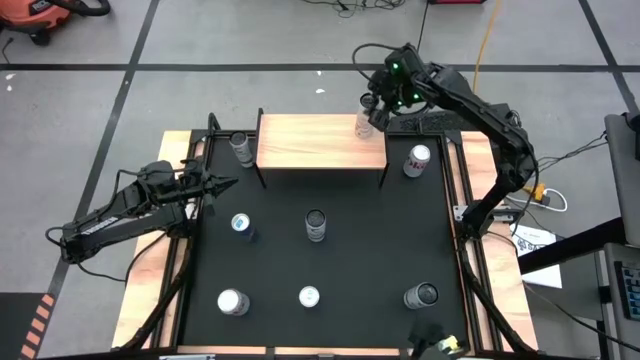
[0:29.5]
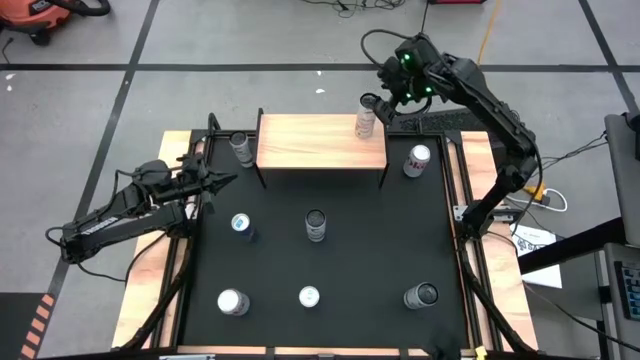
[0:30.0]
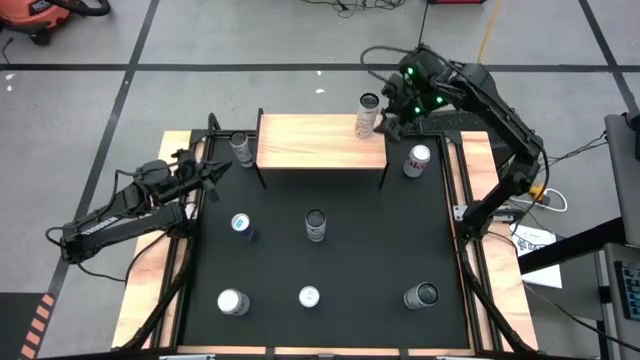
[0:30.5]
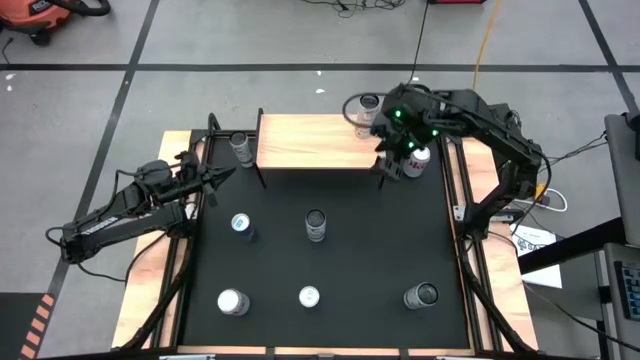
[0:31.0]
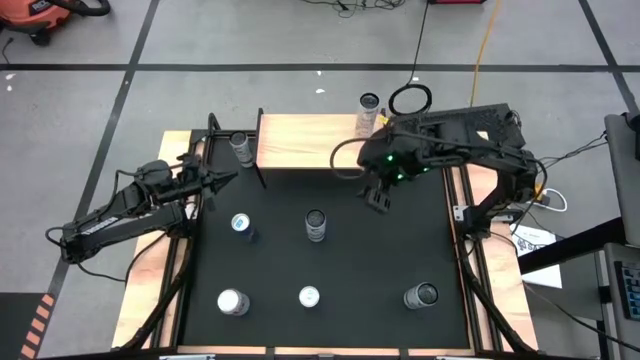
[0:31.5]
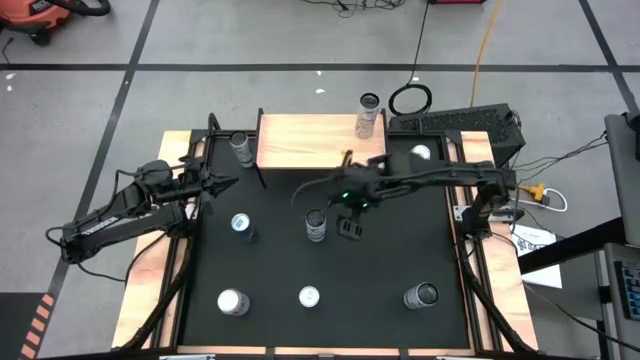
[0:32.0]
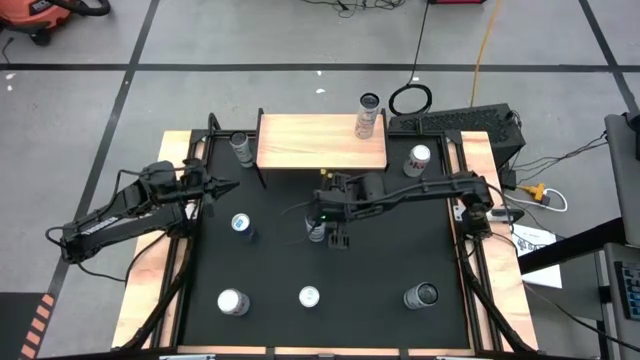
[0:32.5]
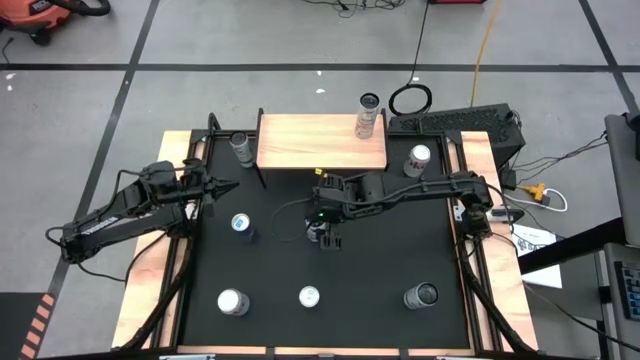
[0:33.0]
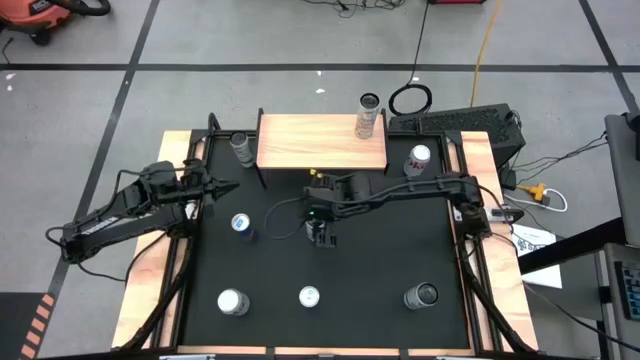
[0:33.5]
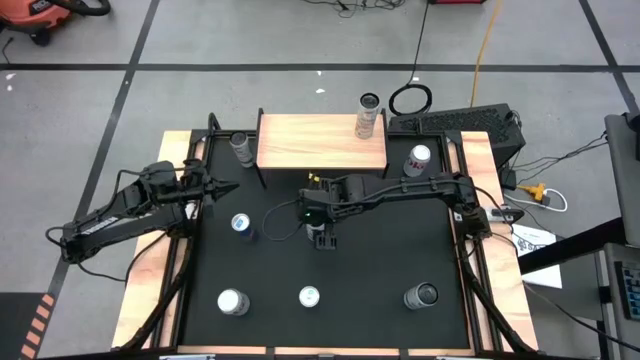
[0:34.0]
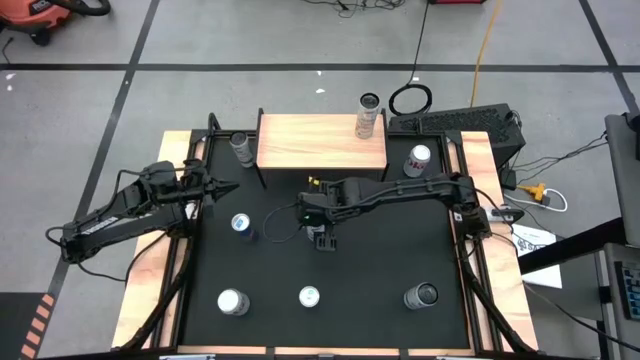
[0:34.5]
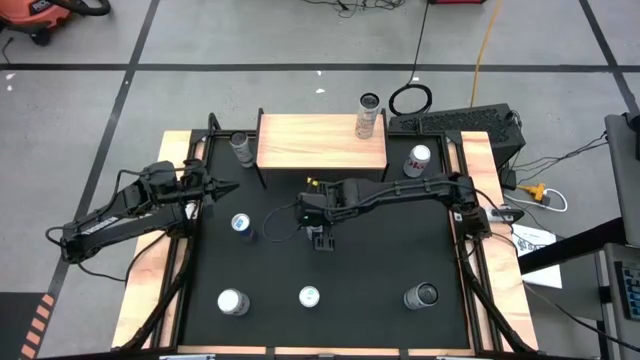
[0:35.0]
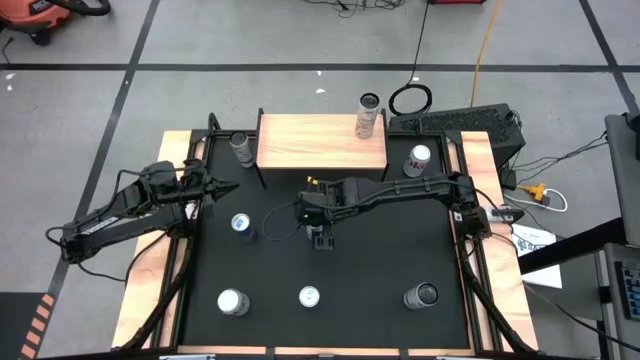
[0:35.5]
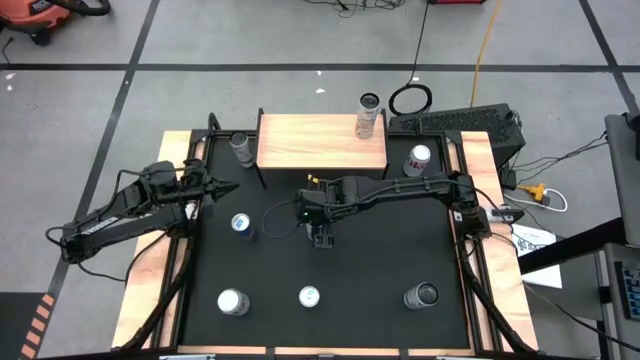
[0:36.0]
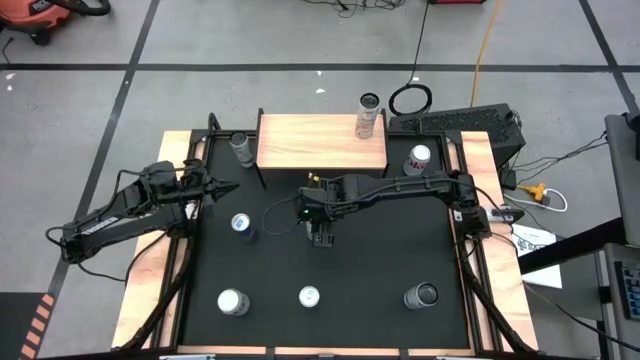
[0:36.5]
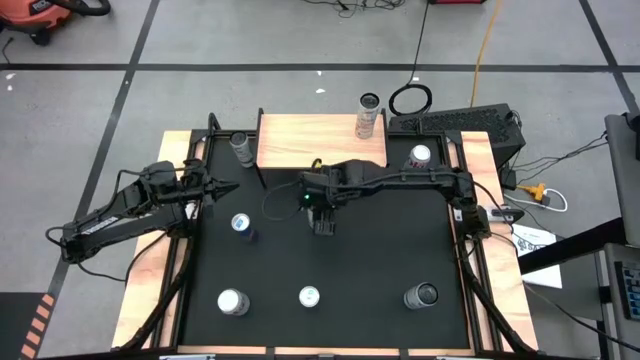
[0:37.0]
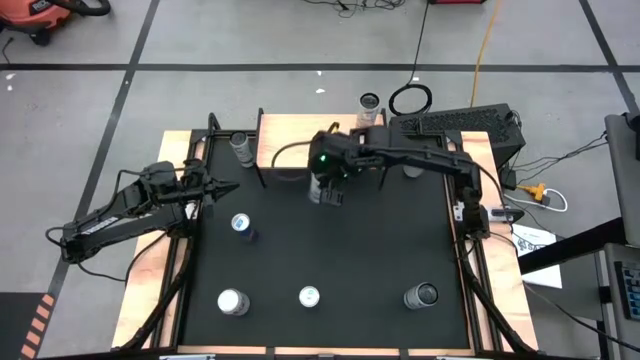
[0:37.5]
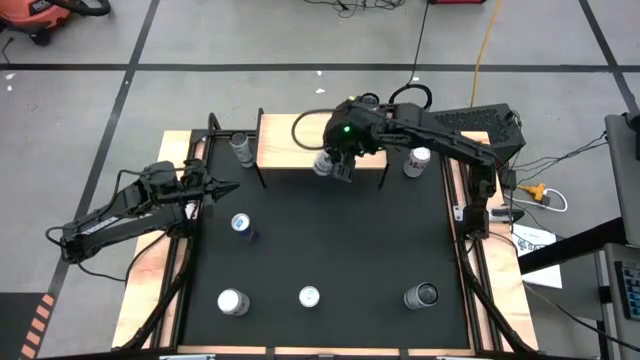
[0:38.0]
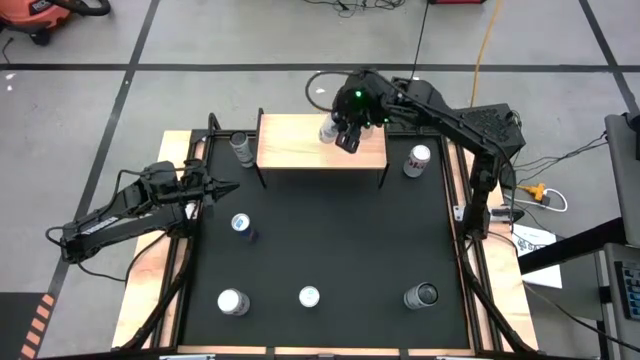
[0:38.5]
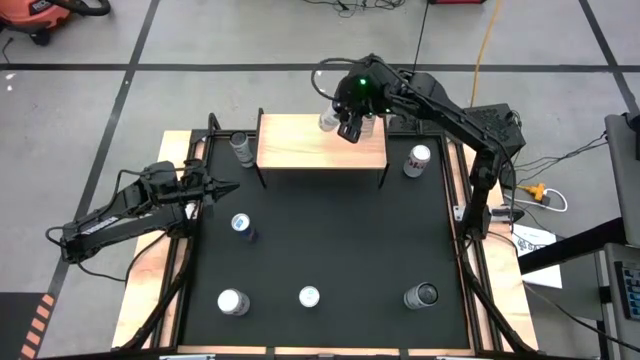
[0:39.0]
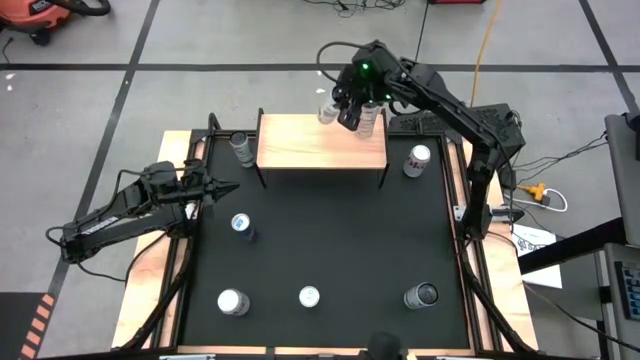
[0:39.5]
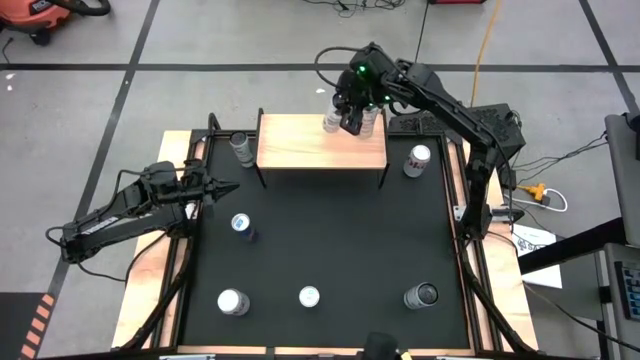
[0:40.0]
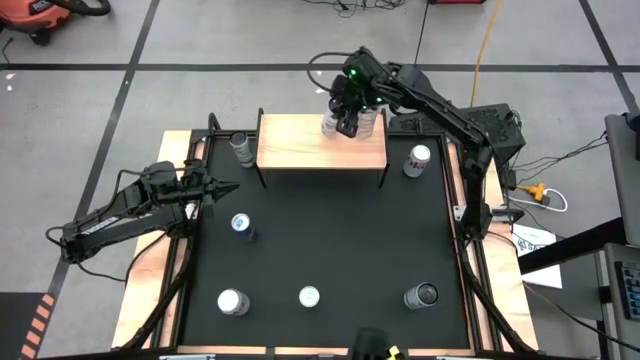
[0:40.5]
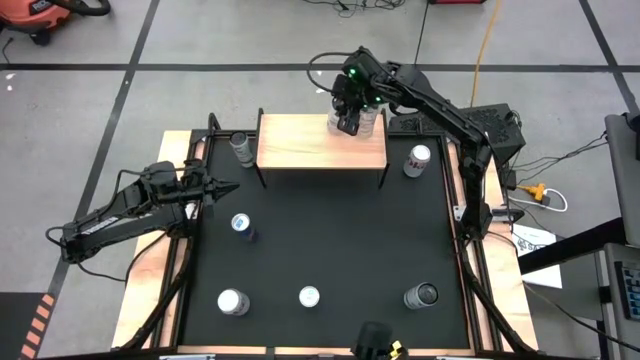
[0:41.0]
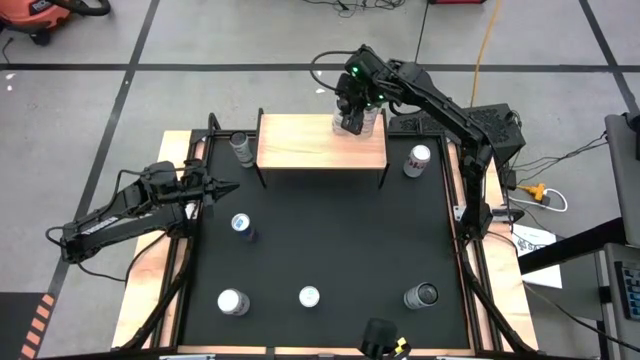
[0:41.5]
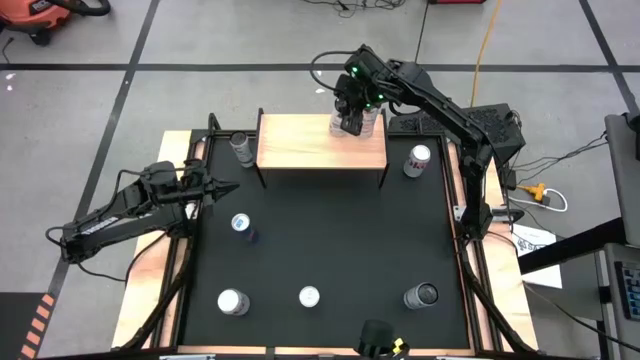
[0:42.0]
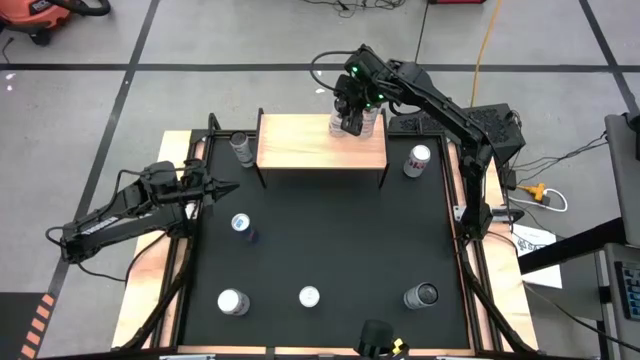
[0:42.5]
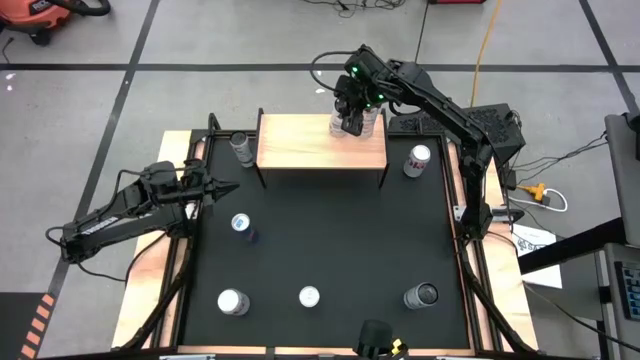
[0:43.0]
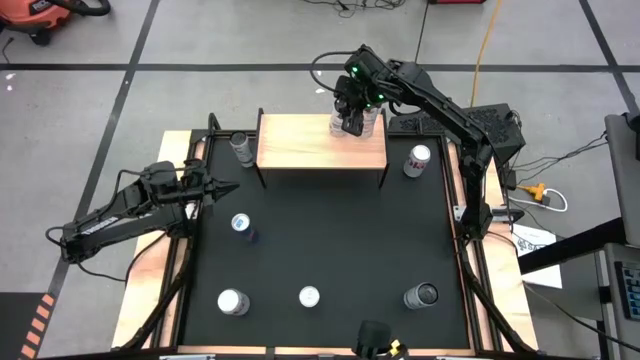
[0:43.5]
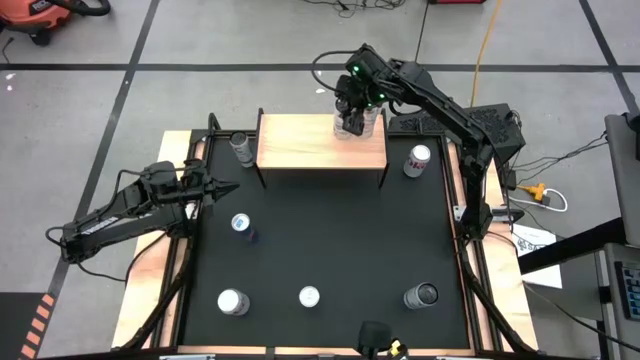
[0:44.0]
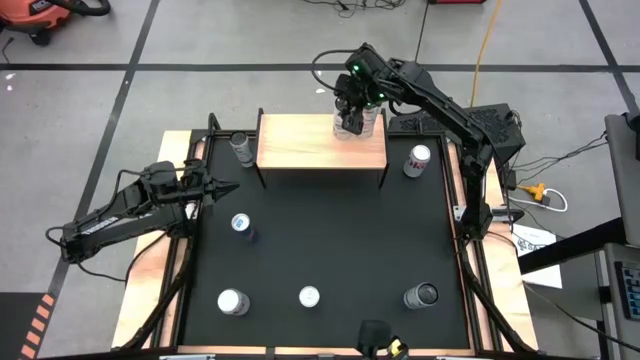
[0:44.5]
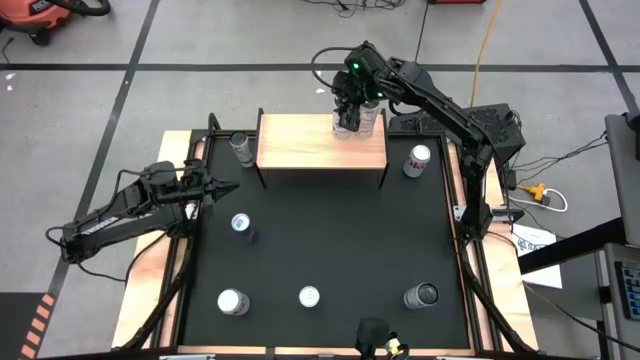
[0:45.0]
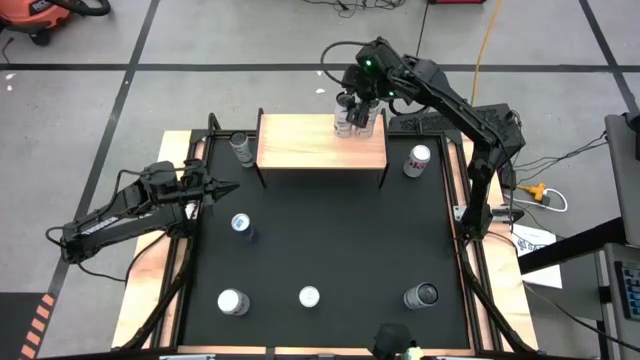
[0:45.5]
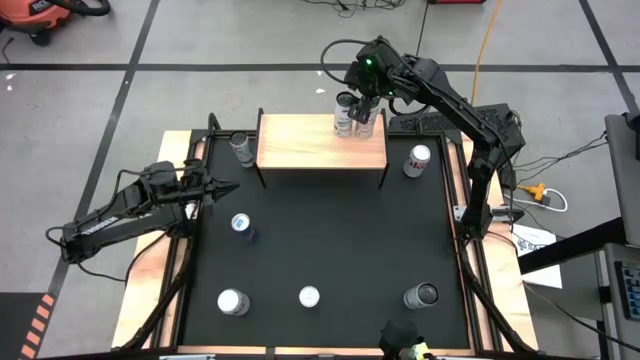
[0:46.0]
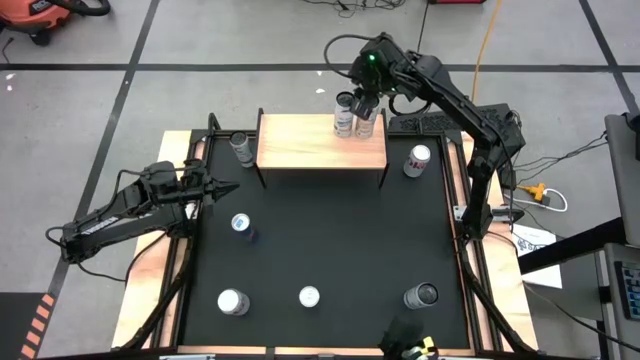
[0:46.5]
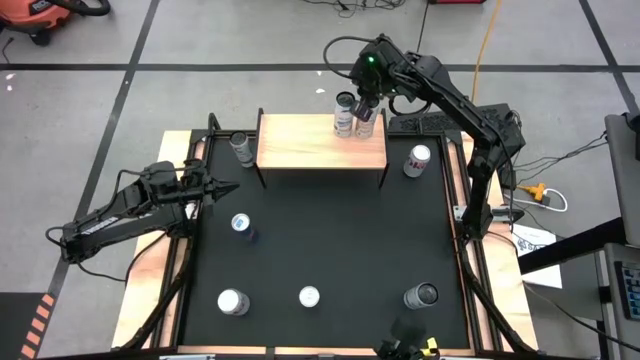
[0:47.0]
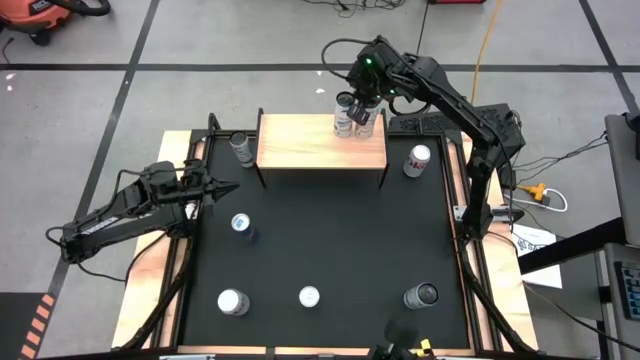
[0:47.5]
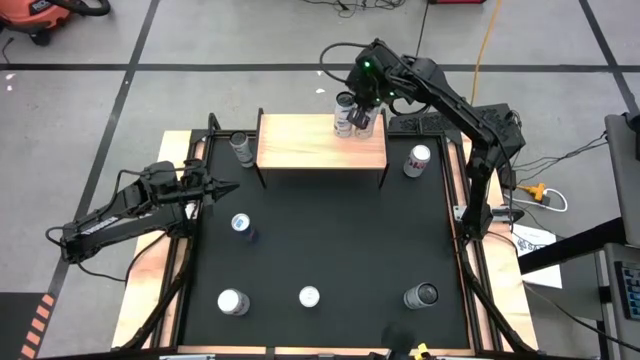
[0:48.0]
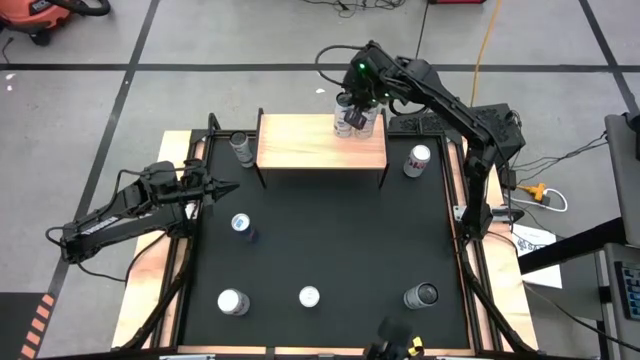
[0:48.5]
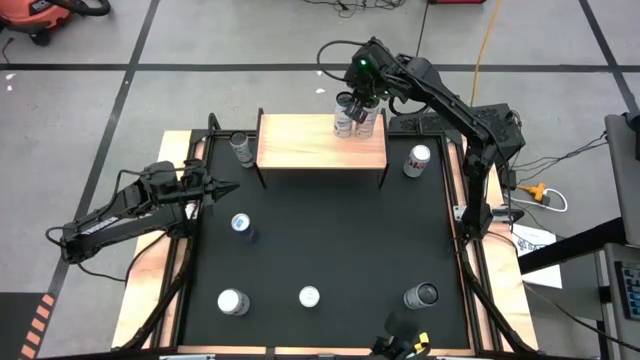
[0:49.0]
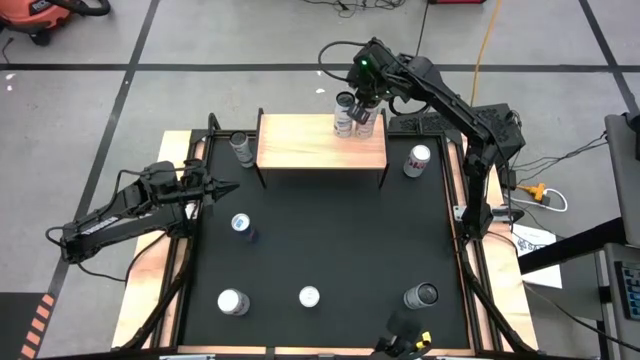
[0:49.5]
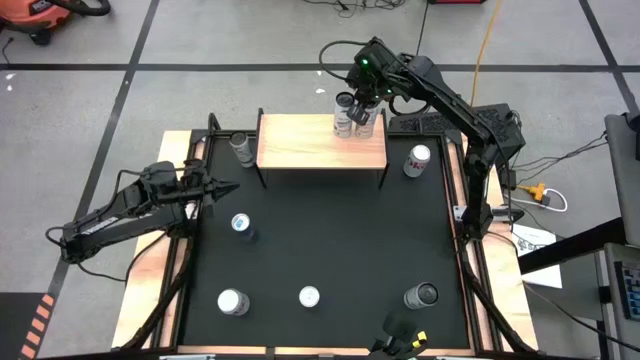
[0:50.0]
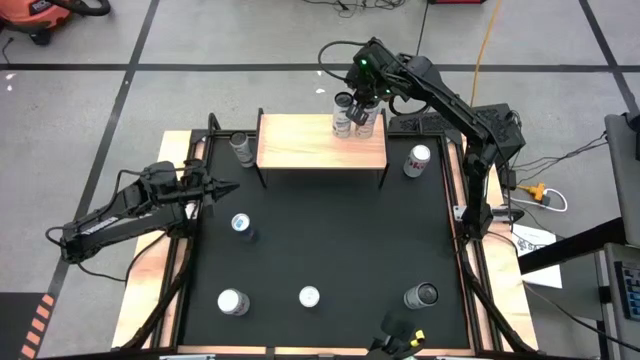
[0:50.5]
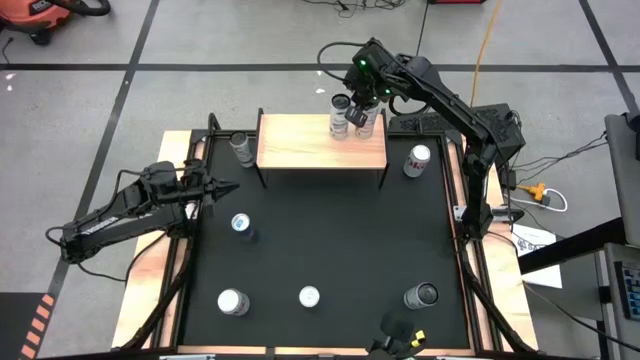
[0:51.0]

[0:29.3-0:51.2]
Task: Place canned beverage on shelf
Put the top white blue soda can on the shelf
